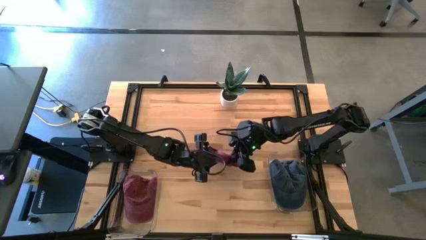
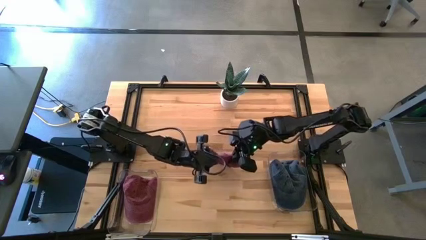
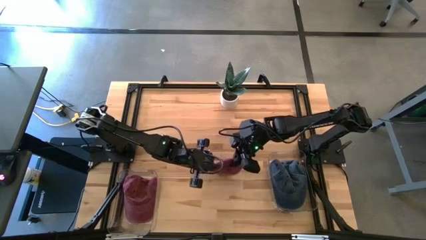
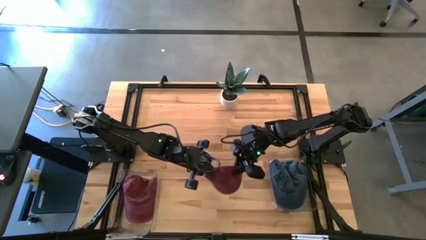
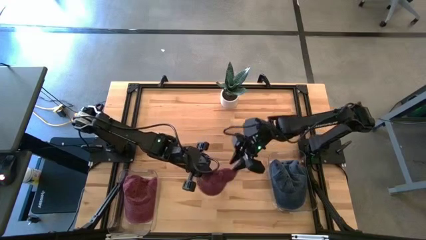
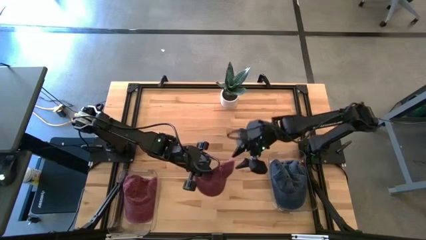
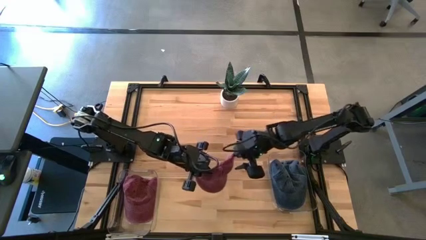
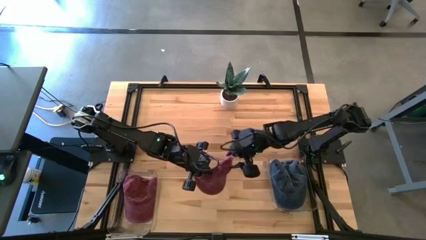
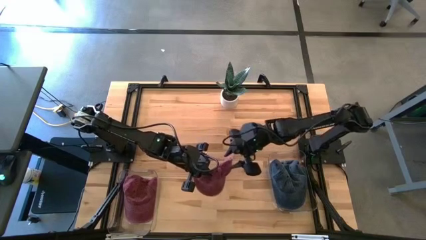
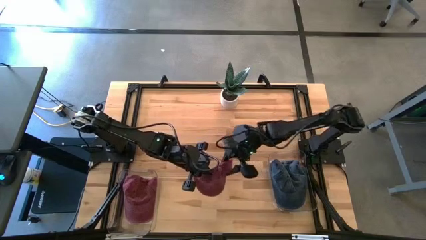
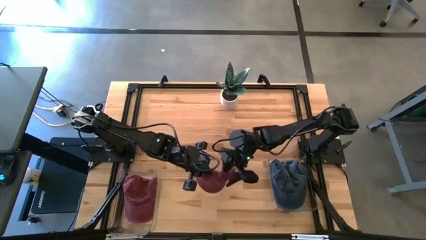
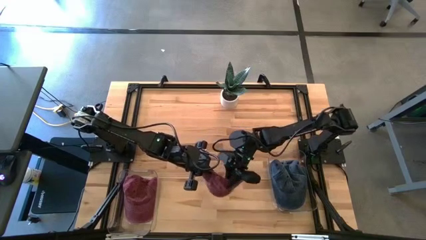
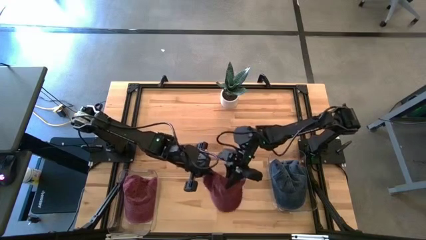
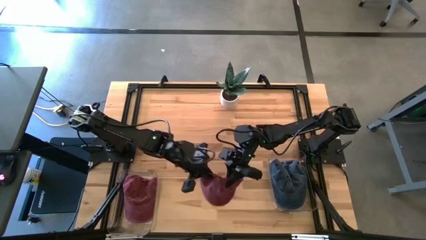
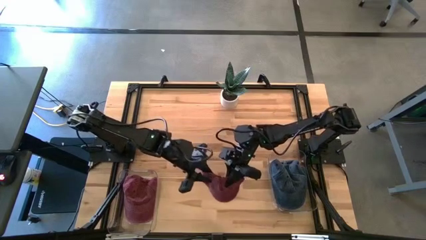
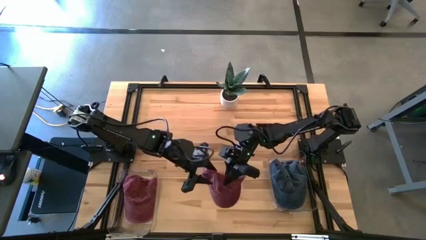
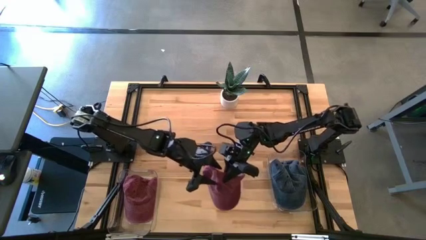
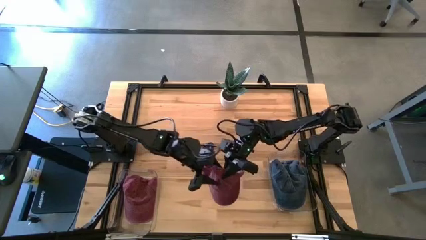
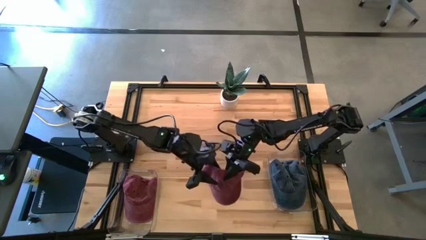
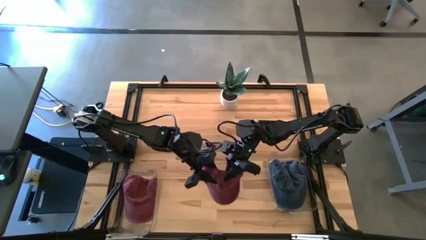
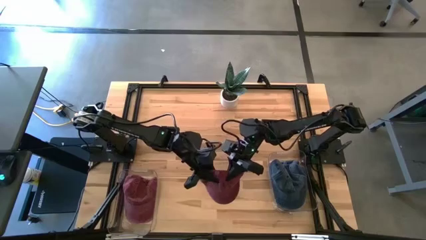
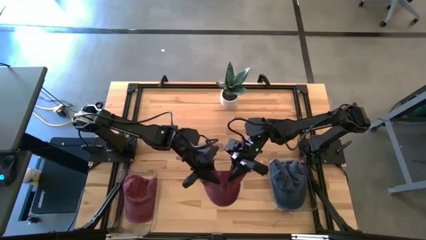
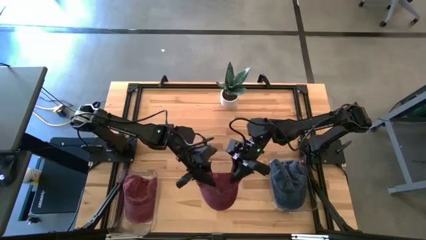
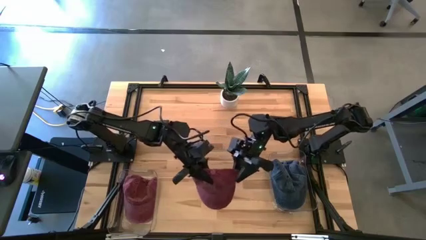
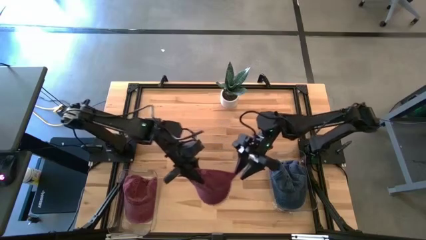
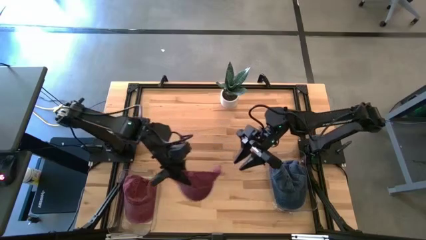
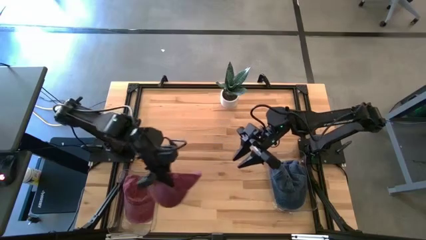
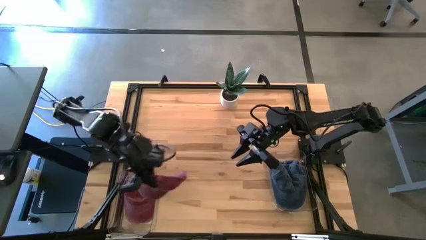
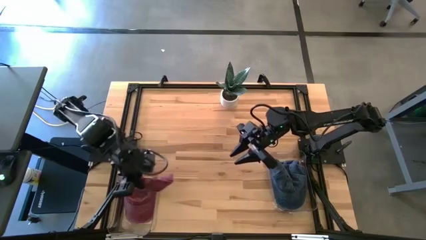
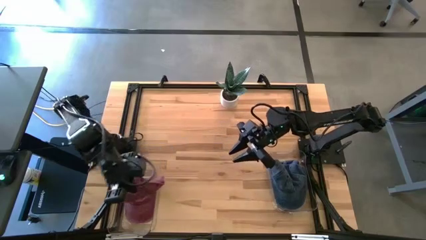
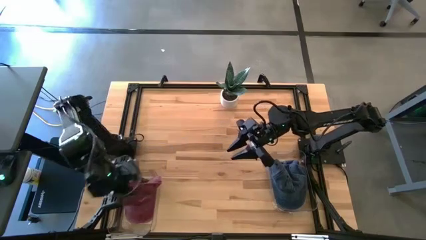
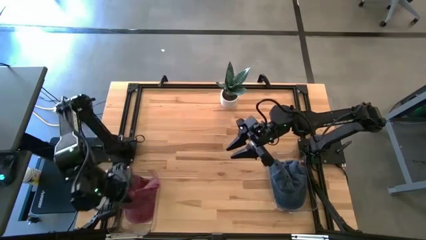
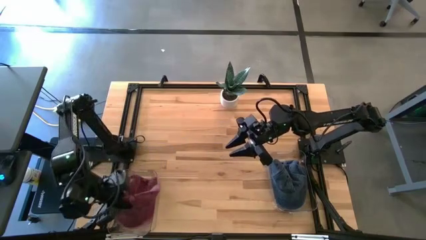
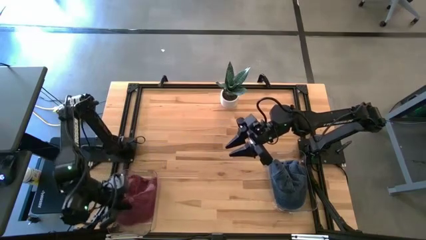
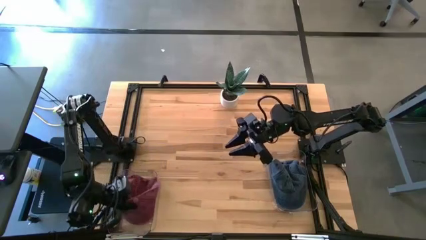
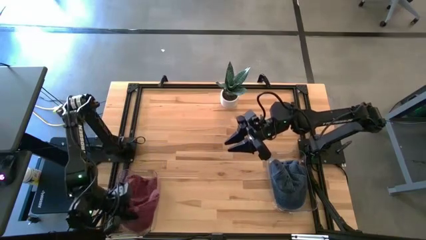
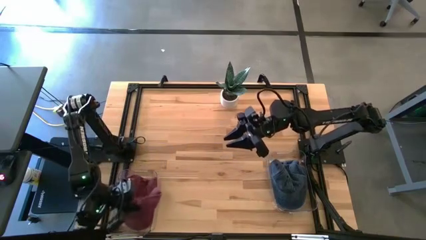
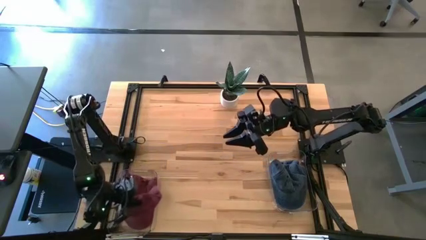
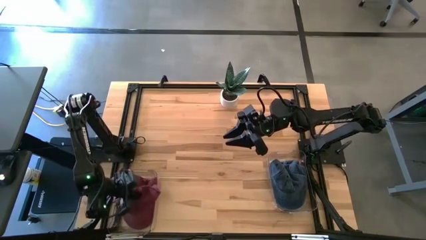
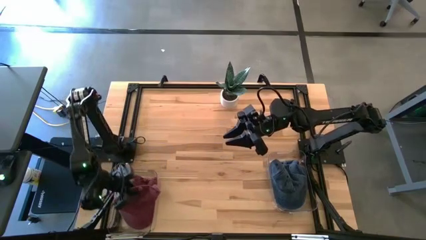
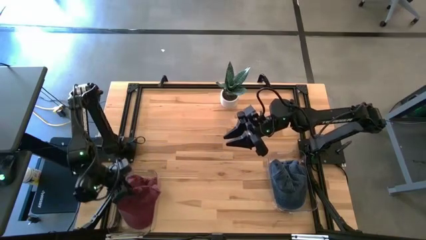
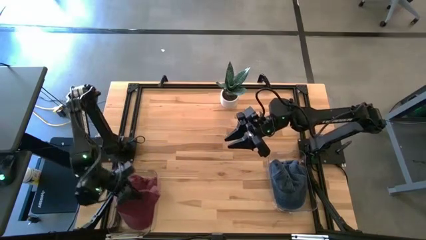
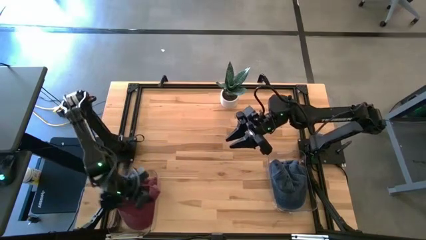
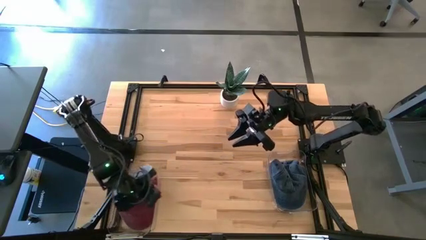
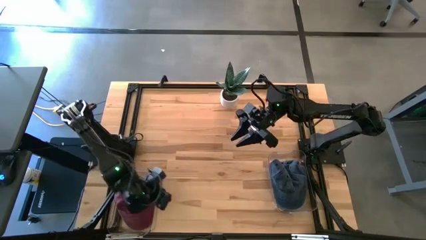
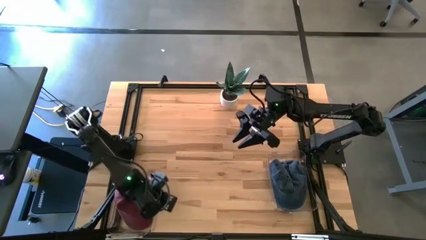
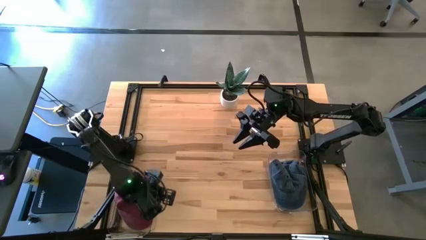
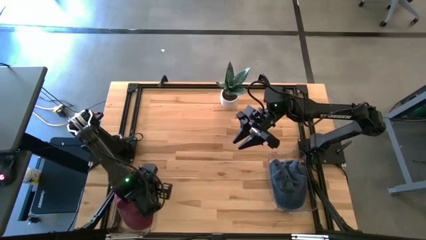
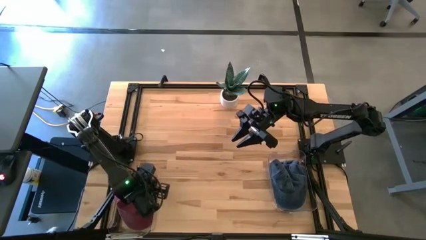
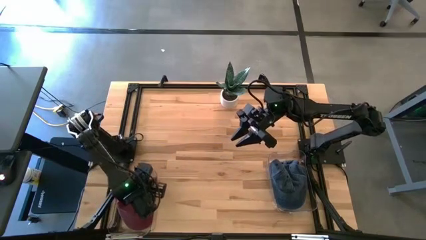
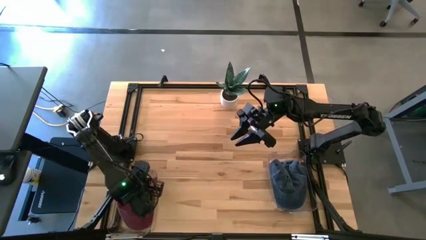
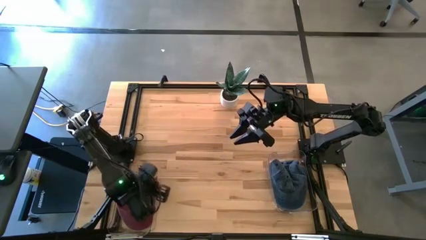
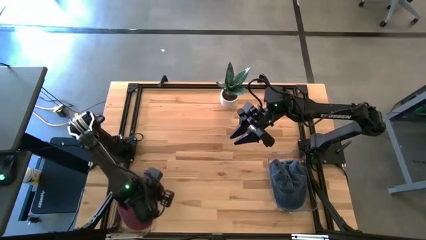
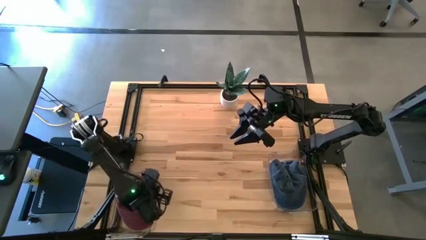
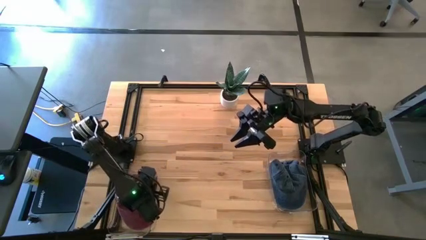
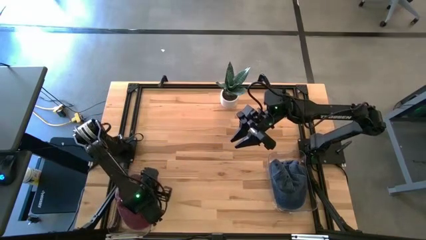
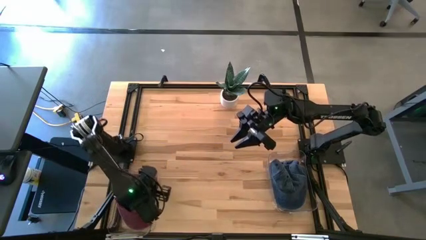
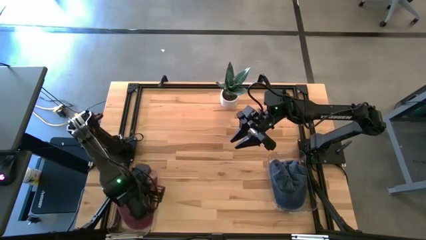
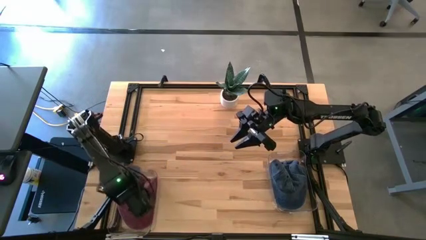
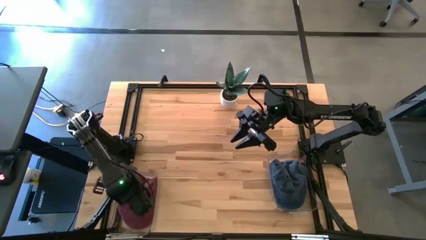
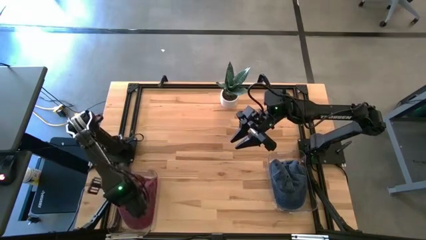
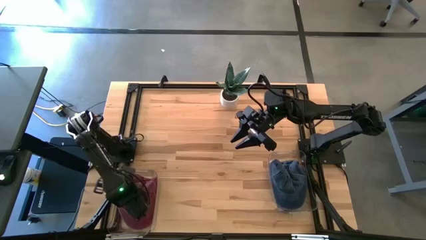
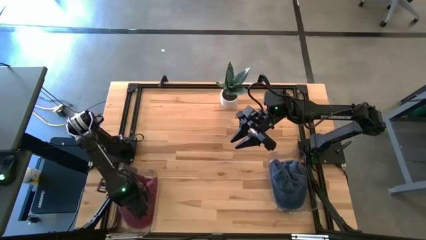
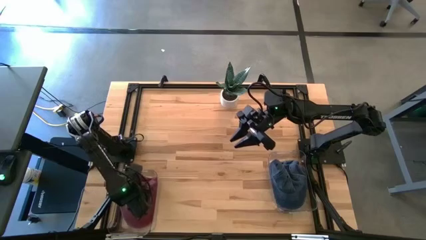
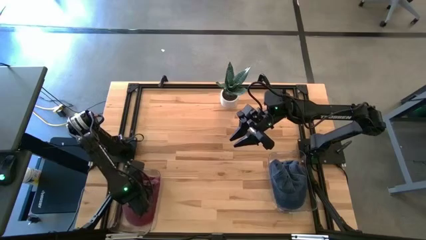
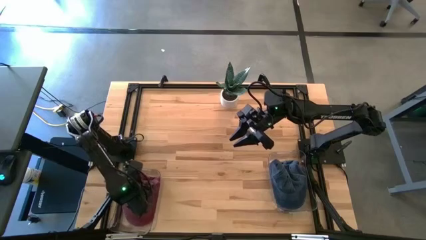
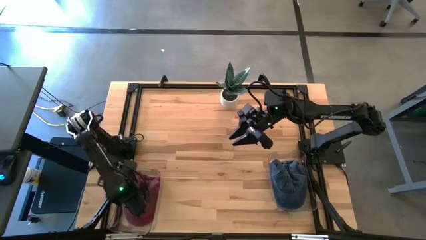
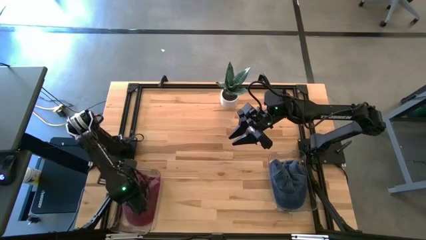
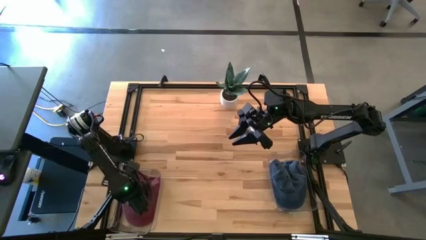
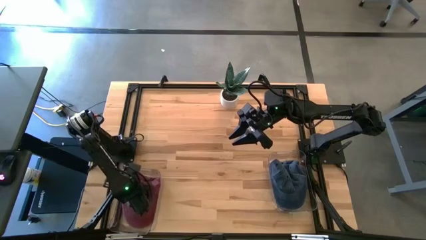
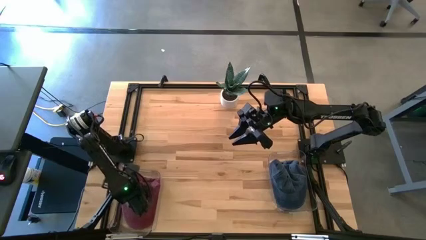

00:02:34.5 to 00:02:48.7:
Task: Pick & Place hat
Put the red cap into the left transparent bin
